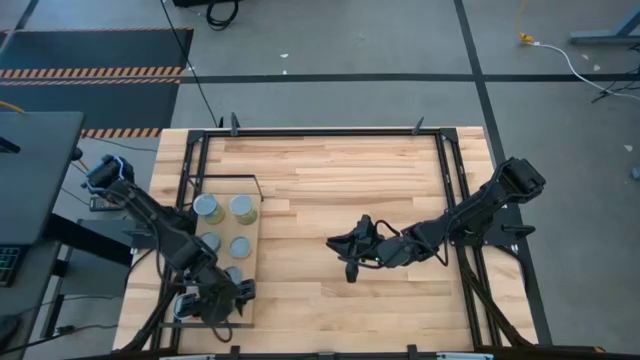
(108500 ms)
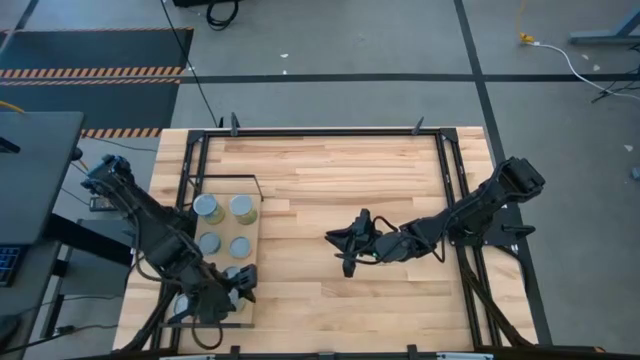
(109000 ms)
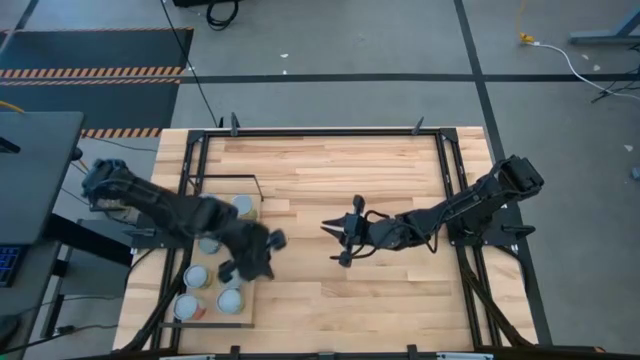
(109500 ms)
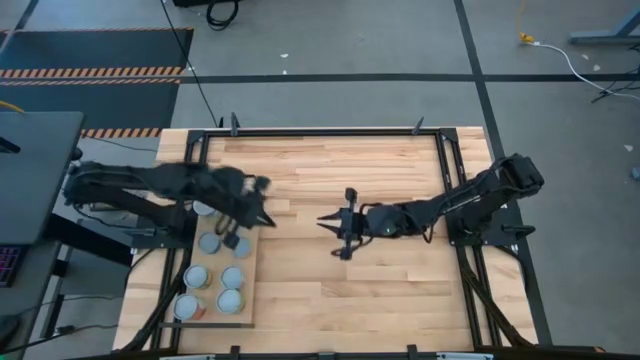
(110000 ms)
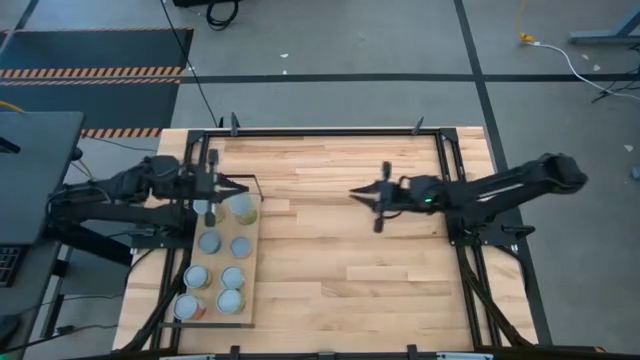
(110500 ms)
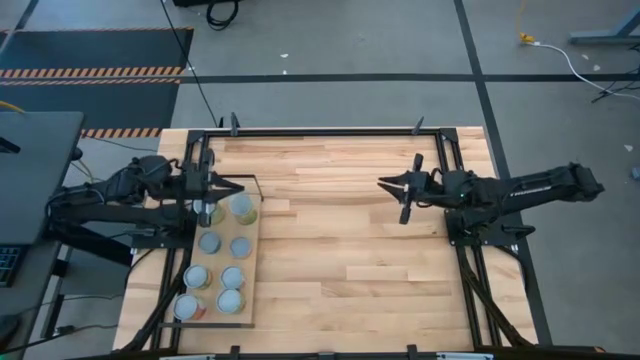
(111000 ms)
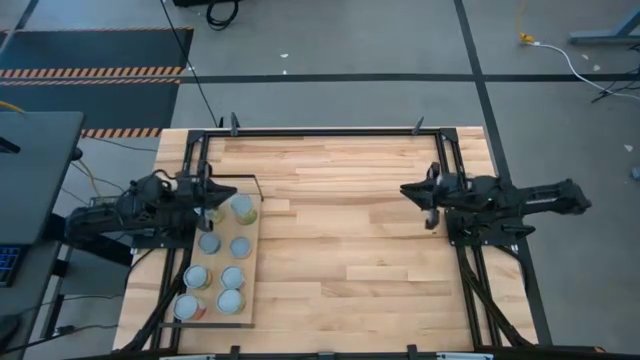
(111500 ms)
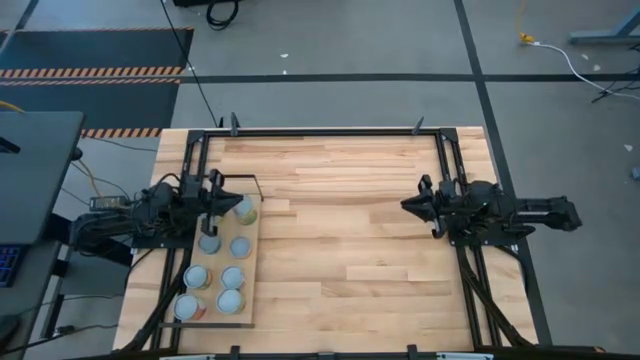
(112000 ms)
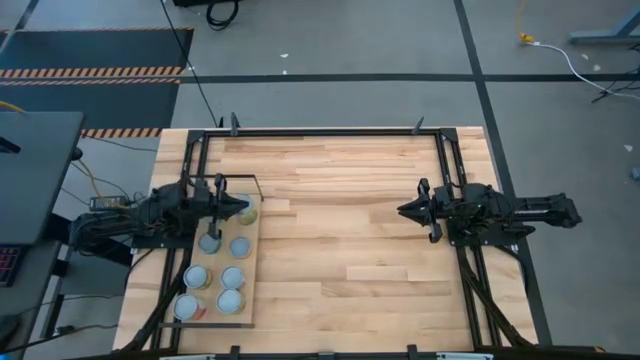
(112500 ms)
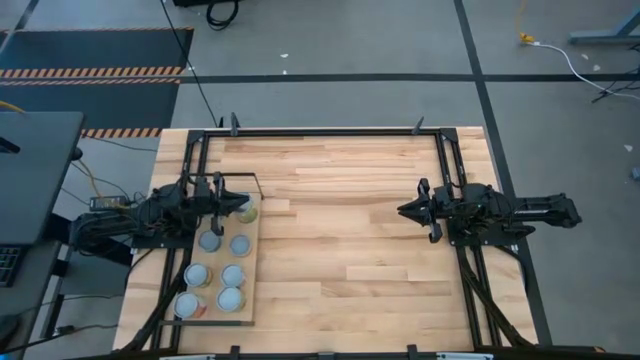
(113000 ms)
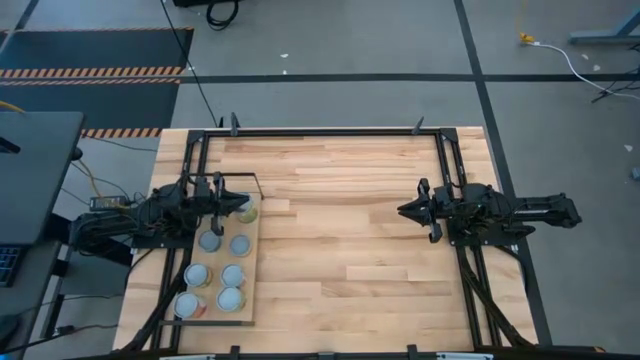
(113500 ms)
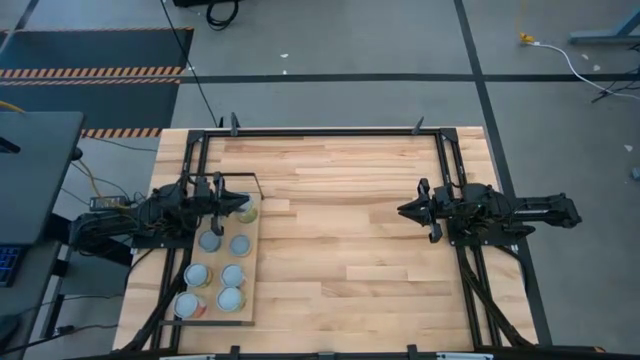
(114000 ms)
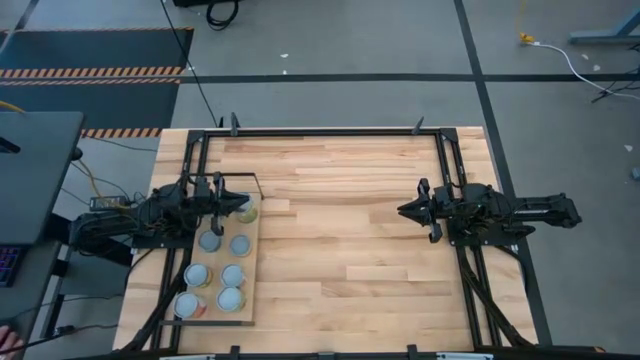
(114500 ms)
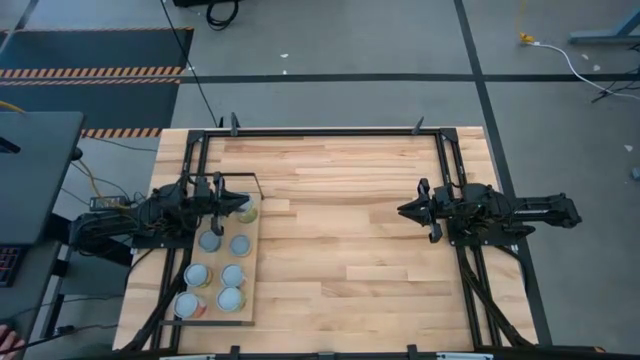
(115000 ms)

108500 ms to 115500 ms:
Task: Pick and place cans onto a shelf
Return to Home Position

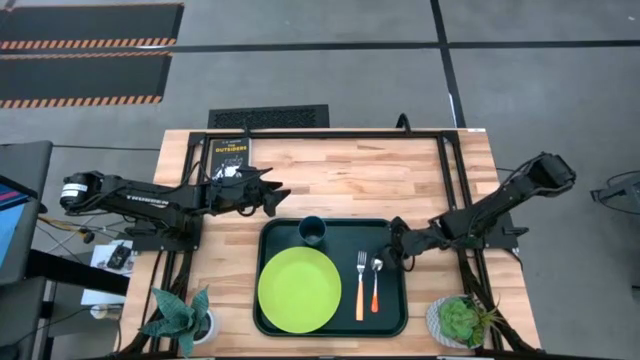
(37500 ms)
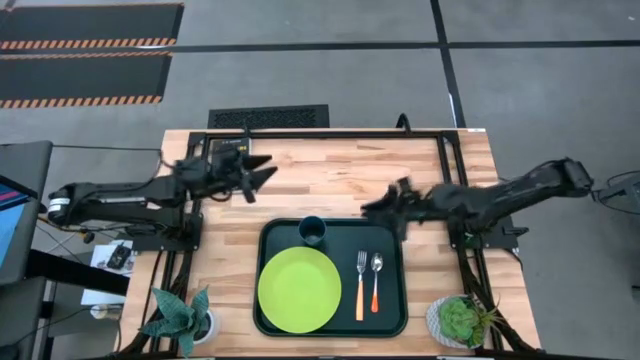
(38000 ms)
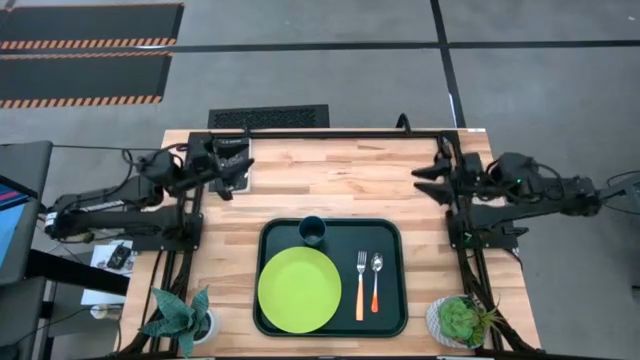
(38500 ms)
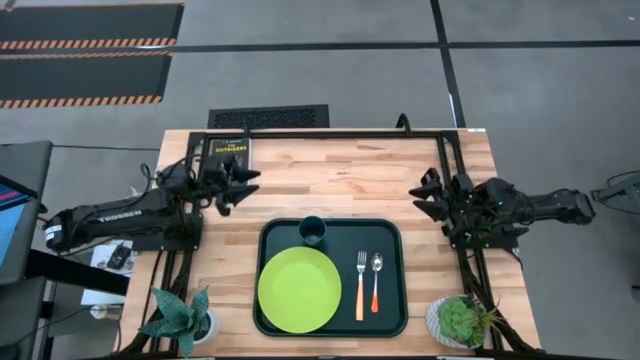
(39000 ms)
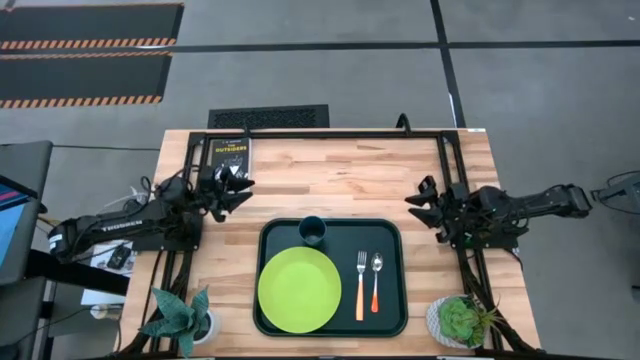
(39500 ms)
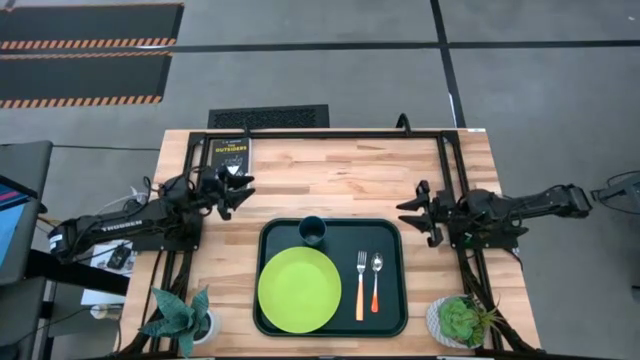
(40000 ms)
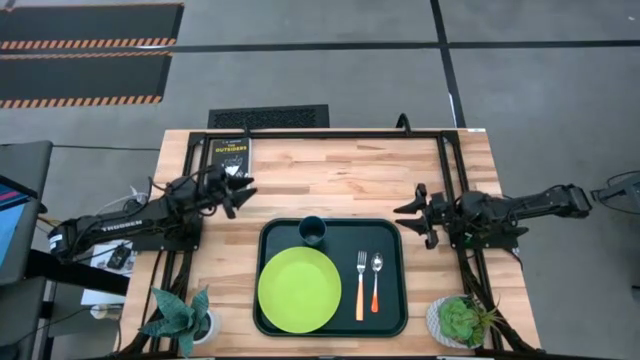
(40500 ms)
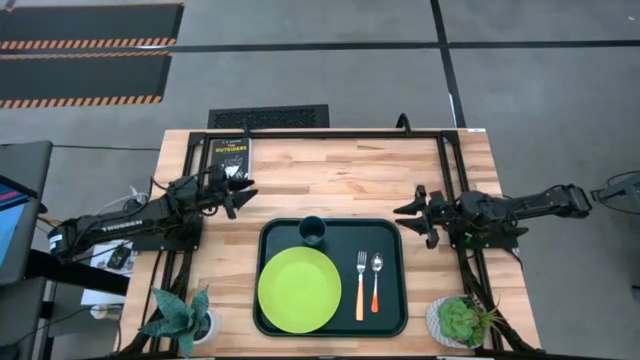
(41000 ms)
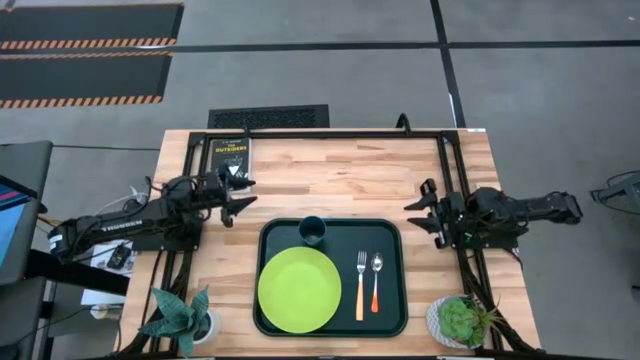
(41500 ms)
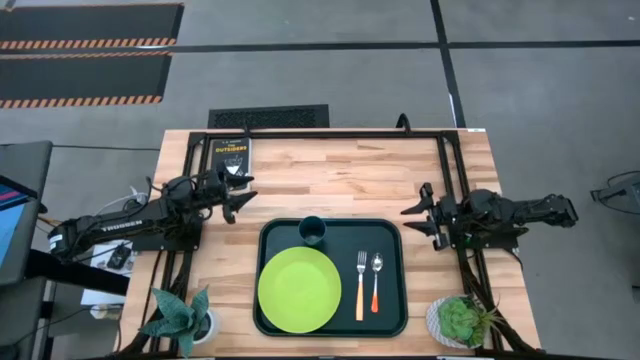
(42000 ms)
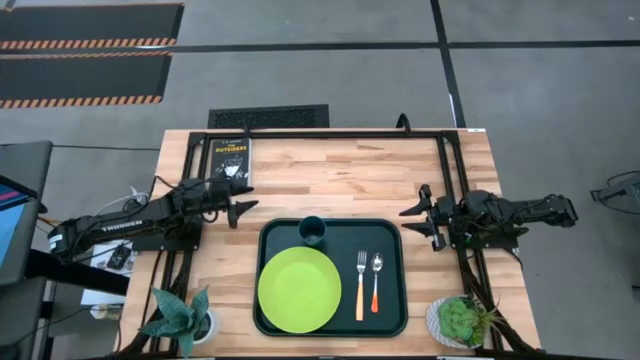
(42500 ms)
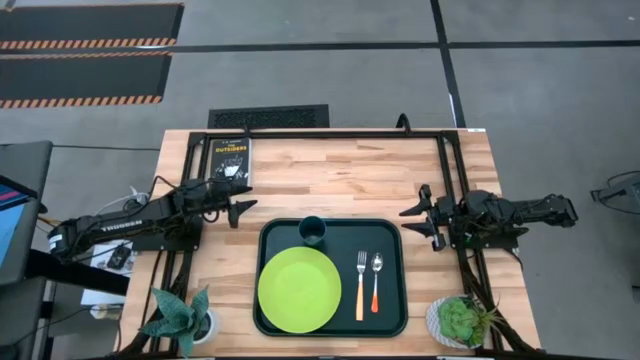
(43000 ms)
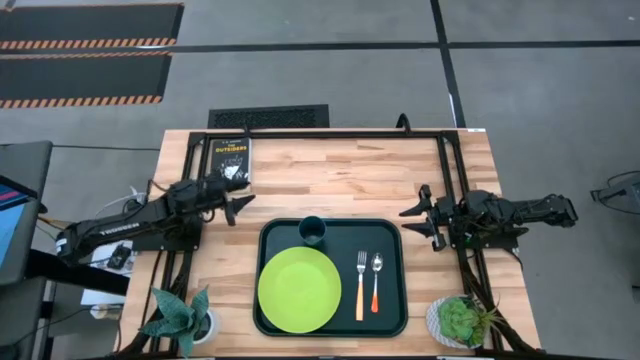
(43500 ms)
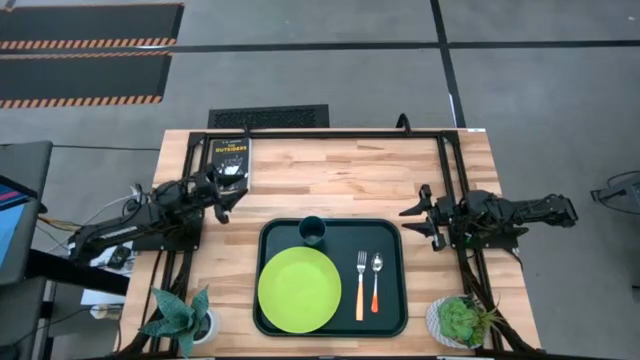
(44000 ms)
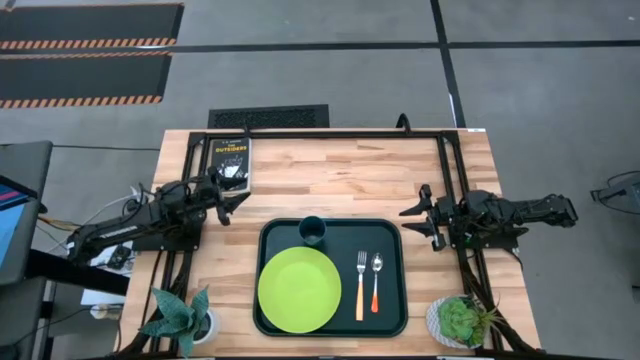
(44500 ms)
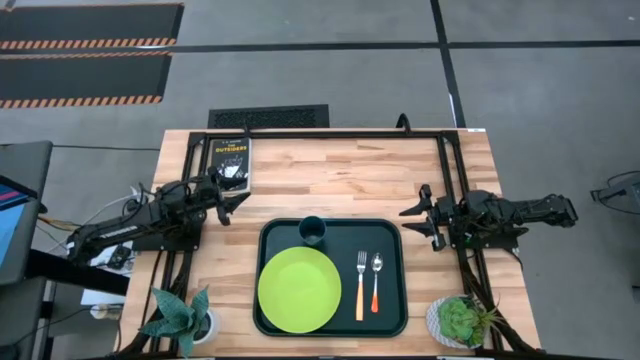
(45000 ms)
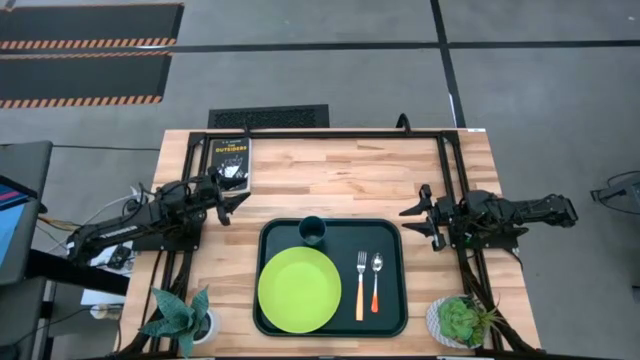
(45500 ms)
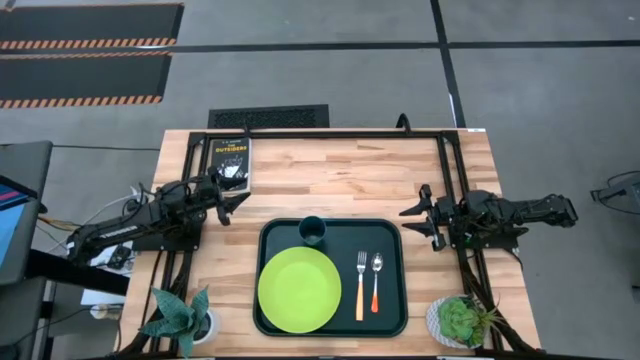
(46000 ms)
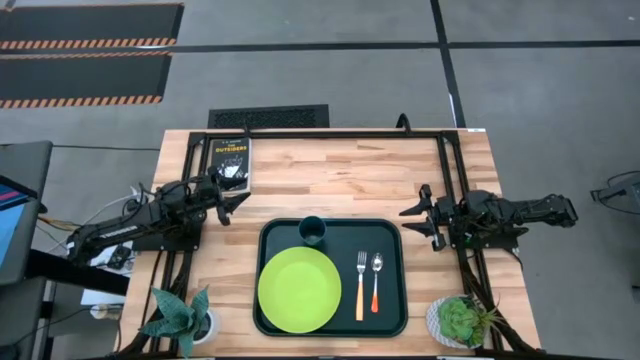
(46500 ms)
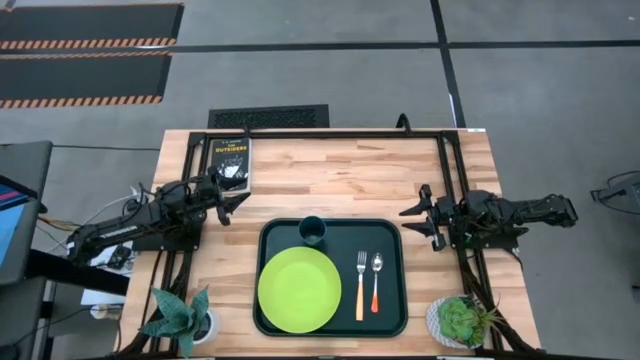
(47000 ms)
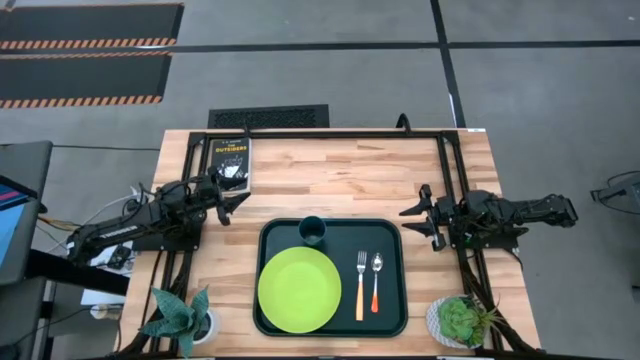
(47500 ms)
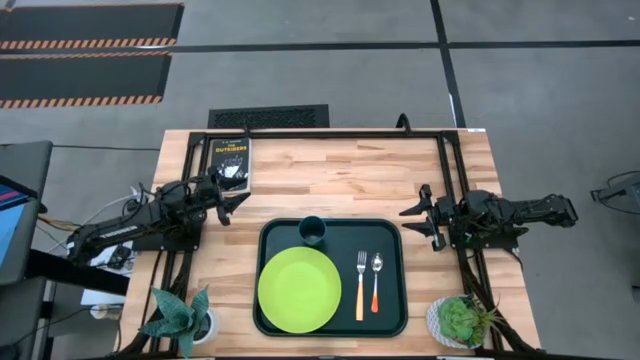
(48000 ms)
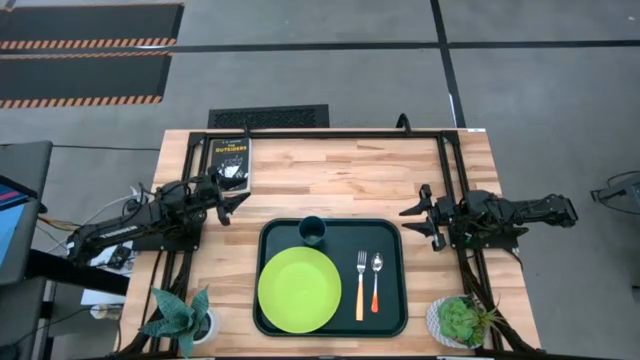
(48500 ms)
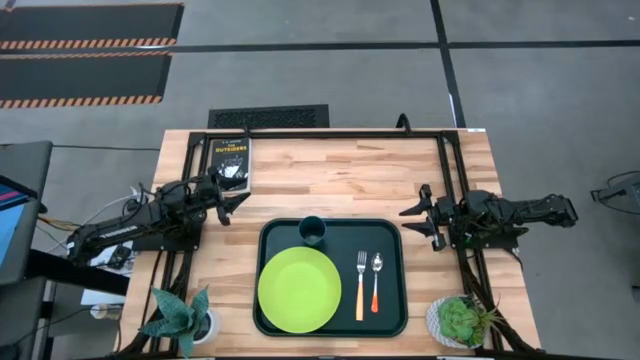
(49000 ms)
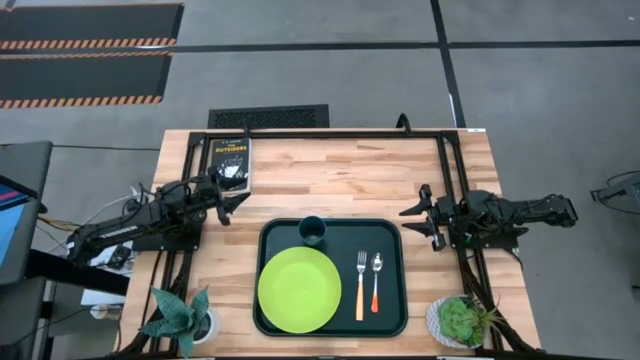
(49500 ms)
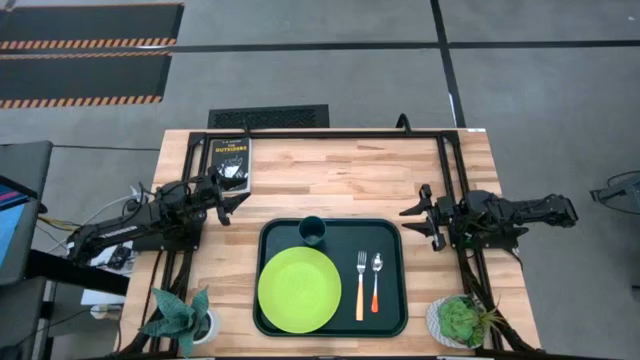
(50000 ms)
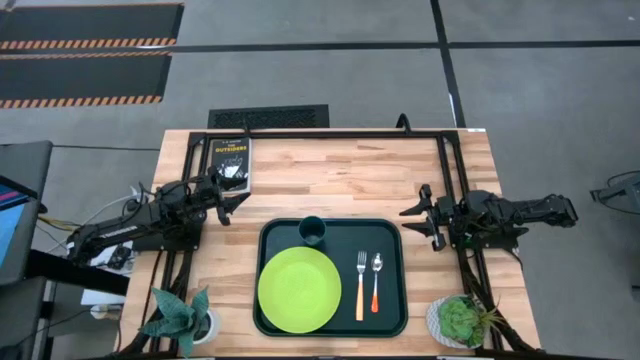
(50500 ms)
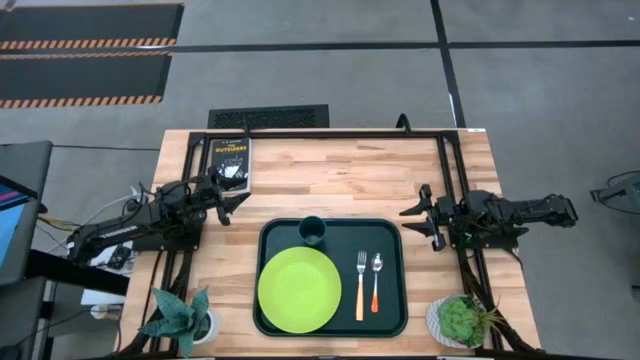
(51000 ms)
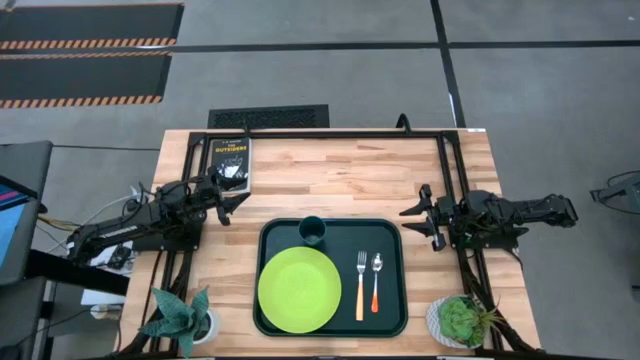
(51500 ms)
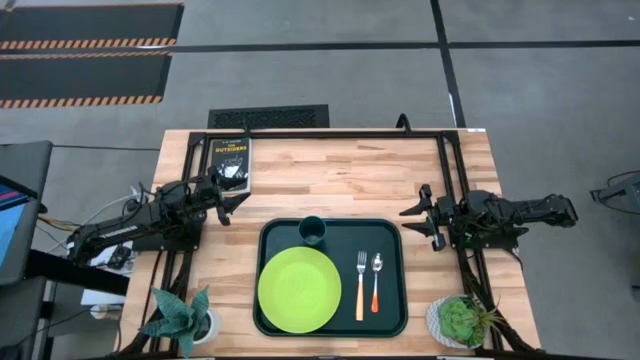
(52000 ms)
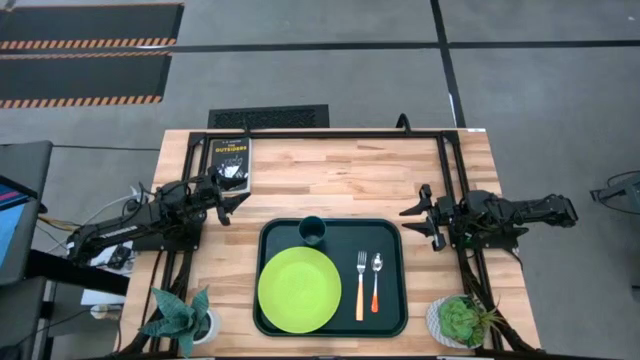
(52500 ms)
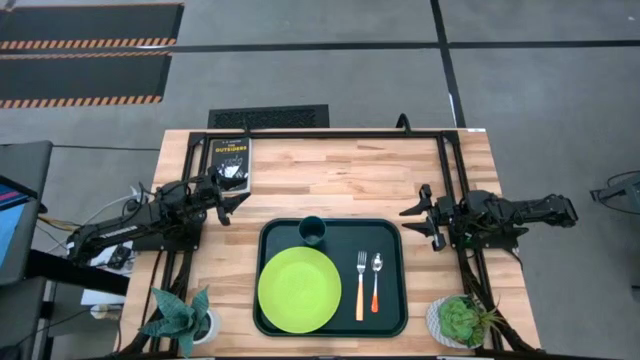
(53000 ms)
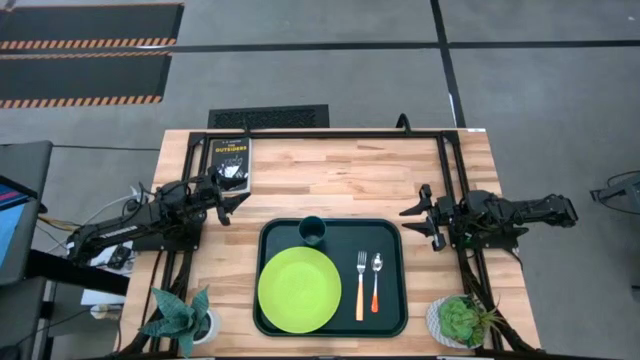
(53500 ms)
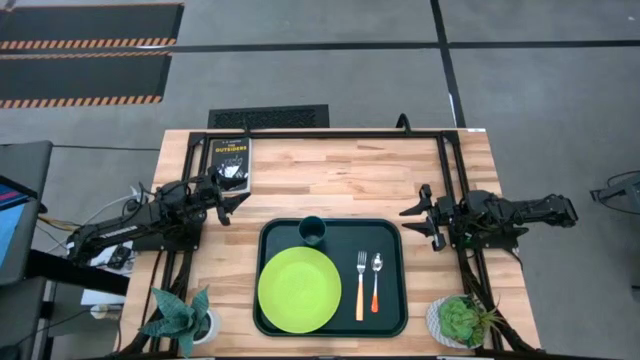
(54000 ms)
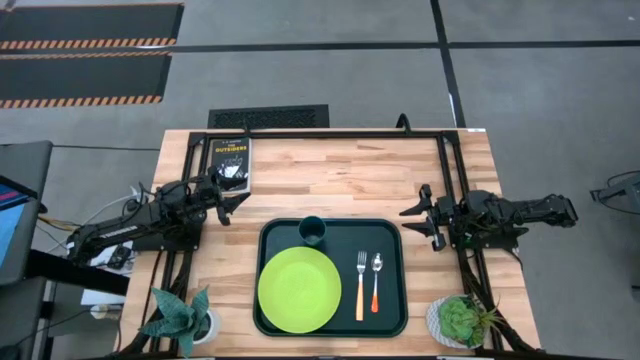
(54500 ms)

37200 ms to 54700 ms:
Task: Pick and place plate/cup/fork/spoon on tray
Return to Home Position
